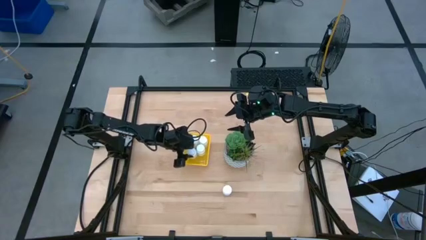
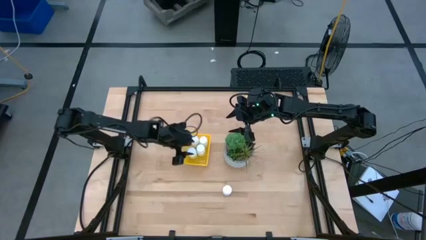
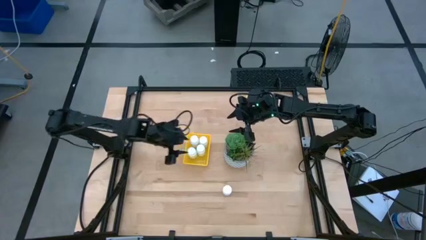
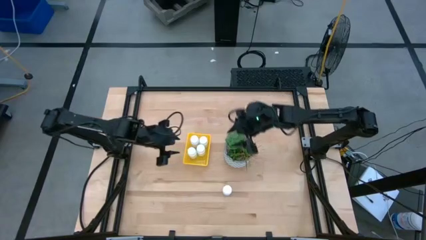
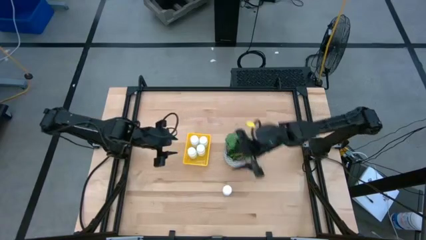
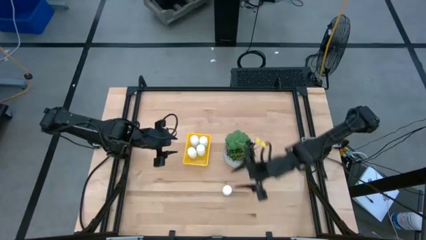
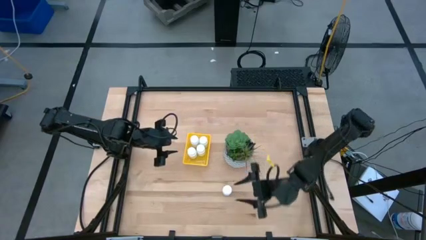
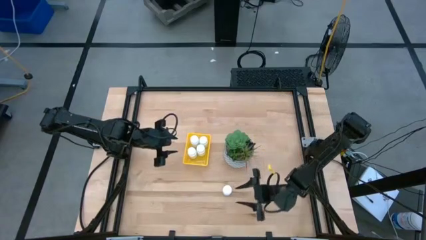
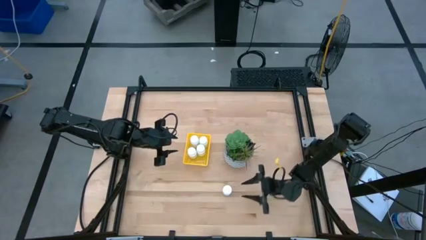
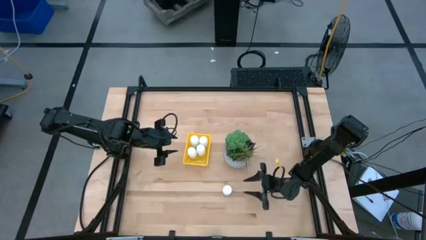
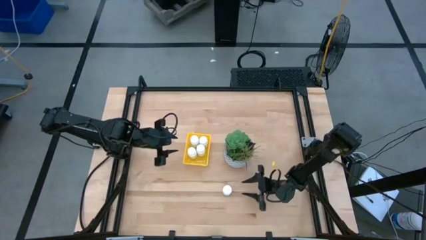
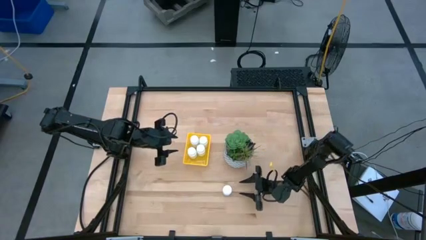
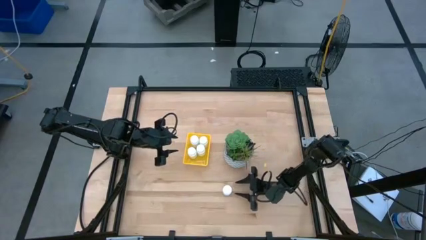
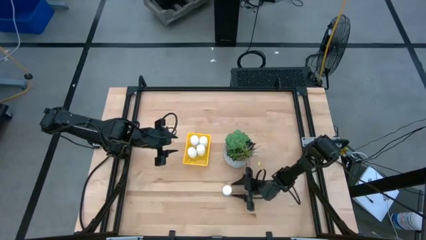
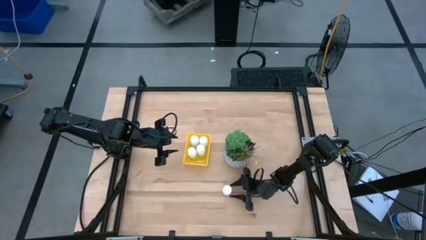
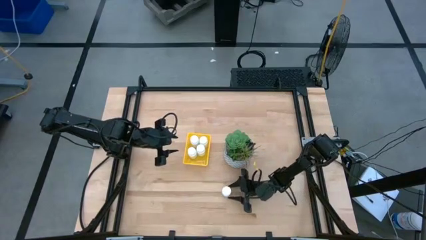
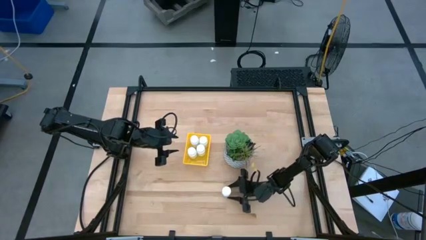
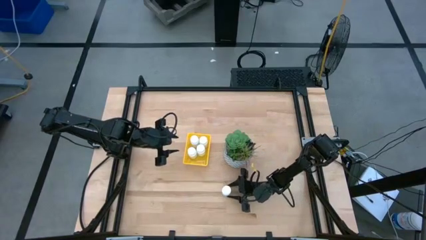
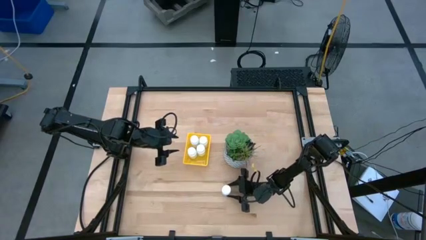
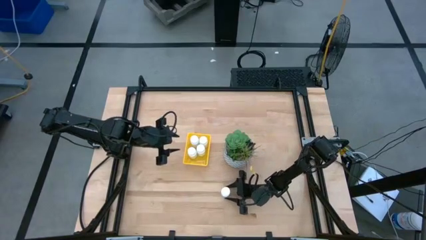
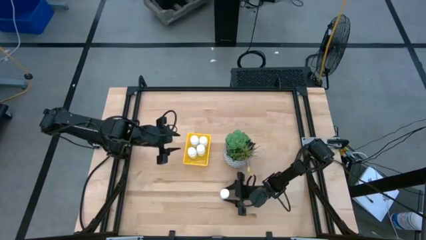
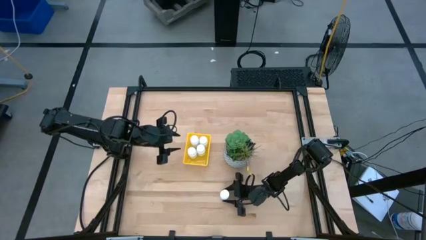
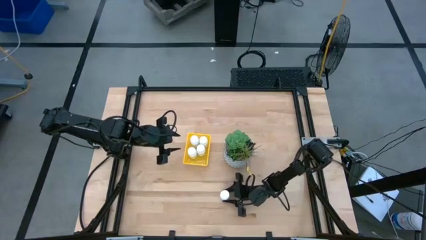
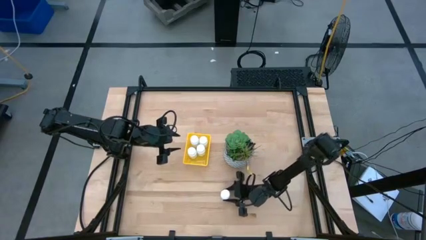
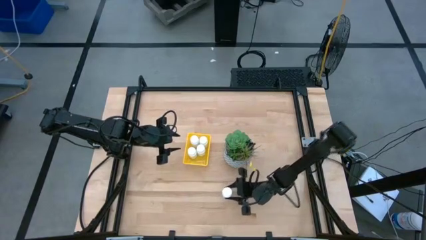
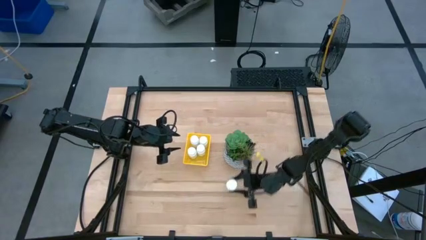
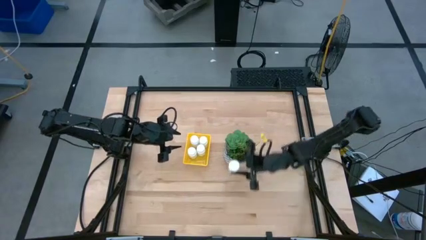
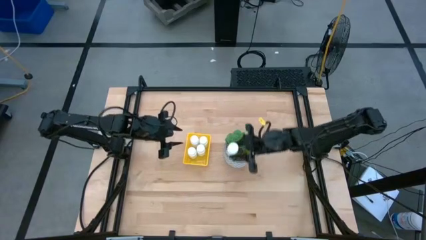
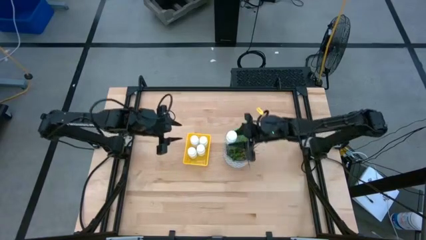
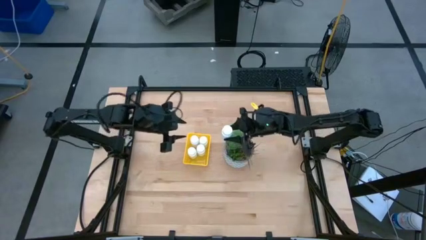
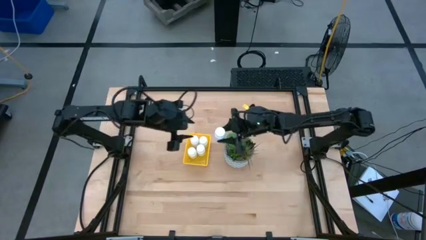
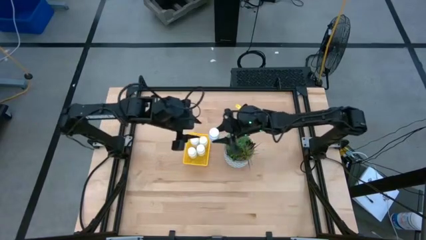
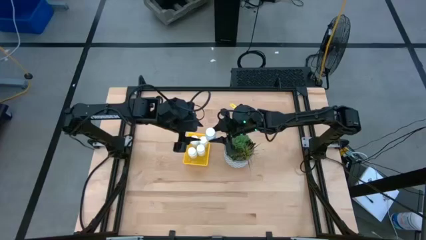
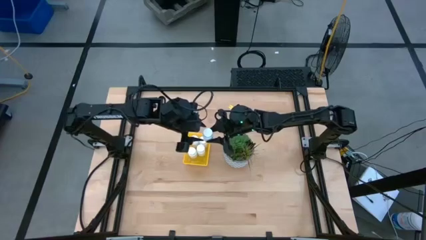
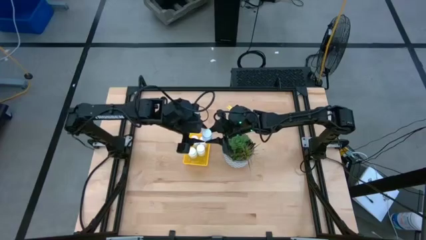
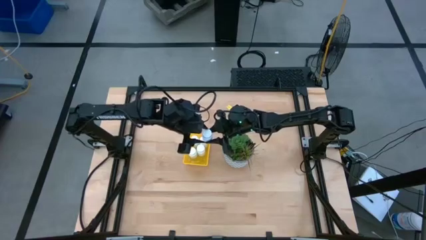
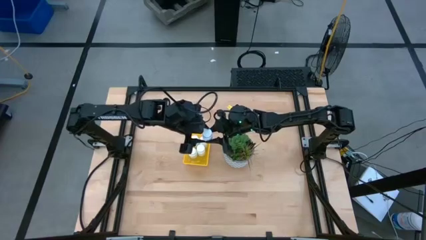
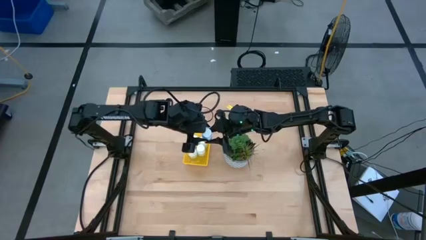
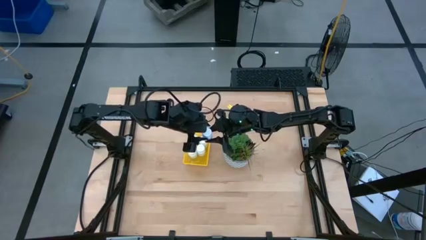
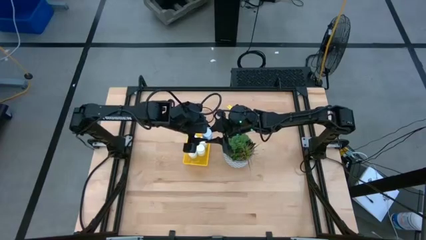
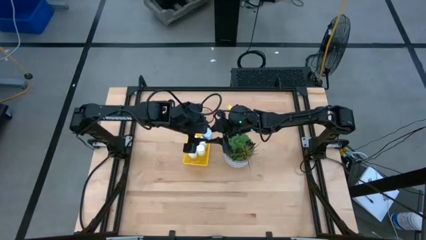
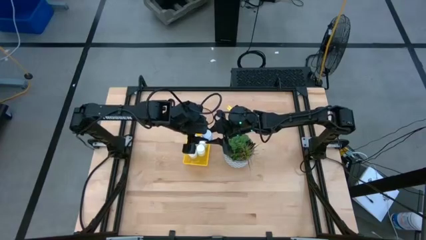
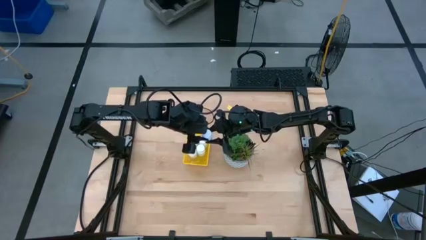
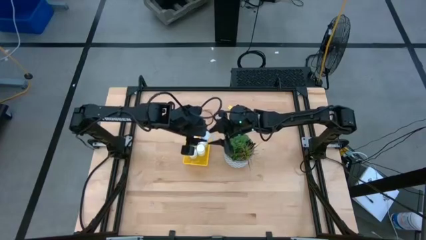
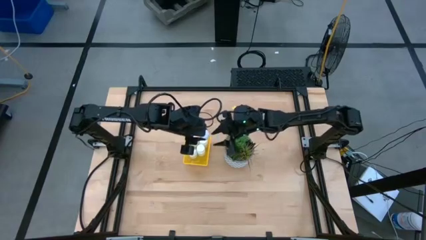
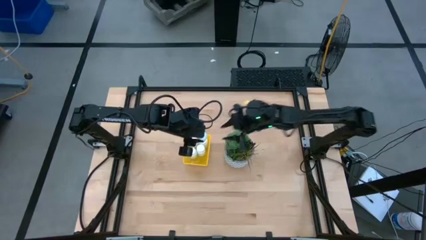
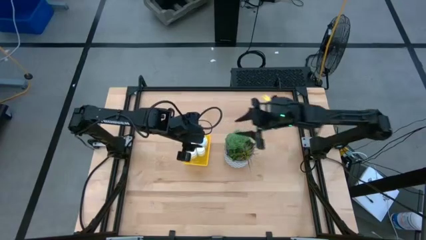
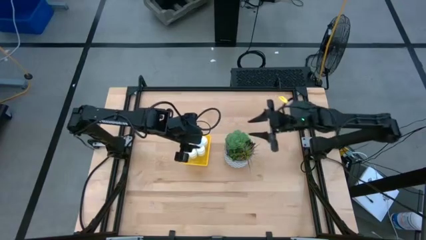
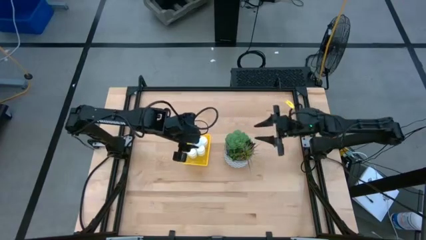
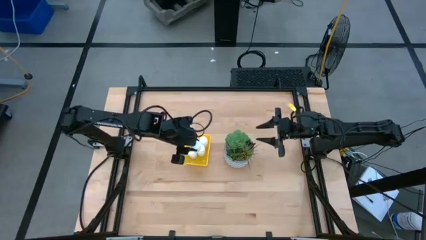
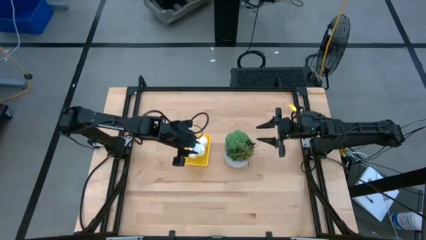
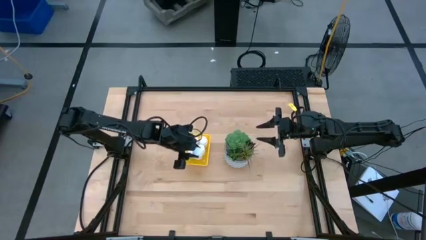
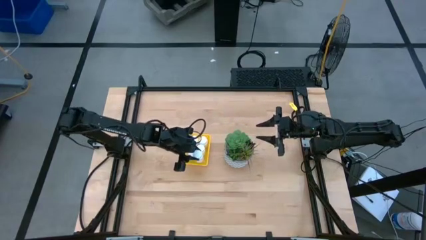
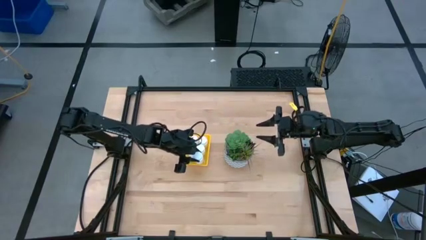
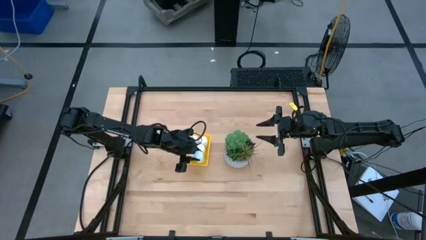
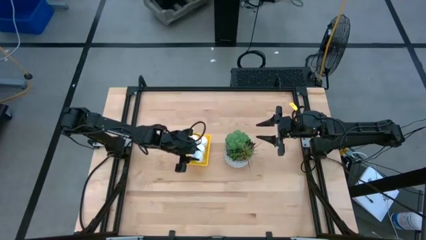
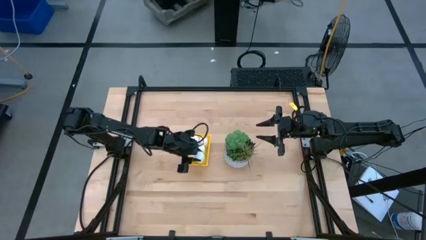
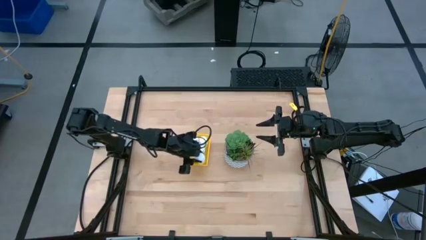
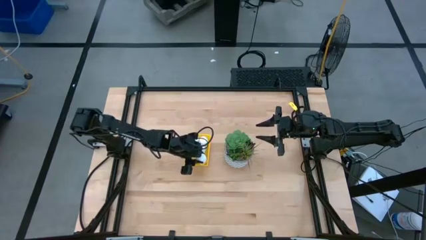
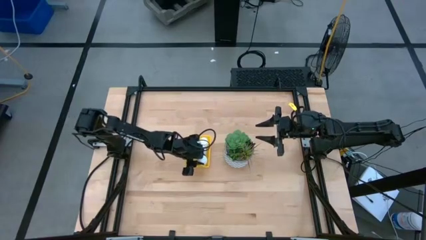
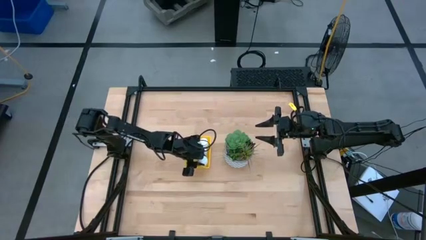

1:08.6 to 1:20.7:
Task: Pick and place pill bottles into a basket
Put the white medicine bottle into the yellow basket

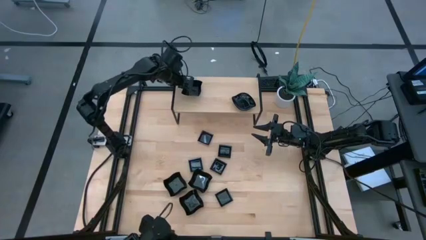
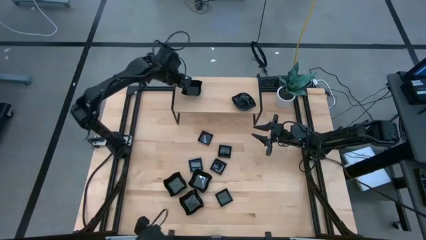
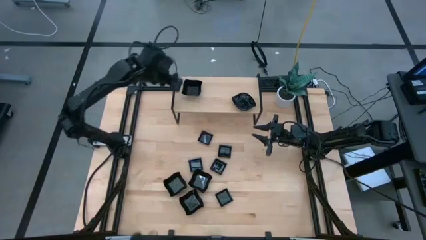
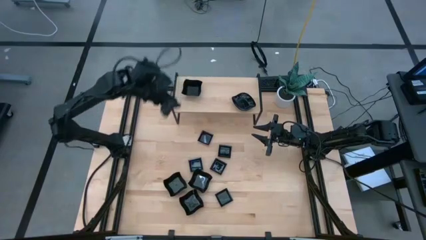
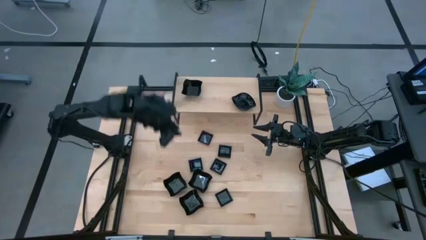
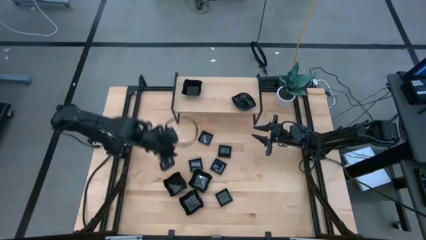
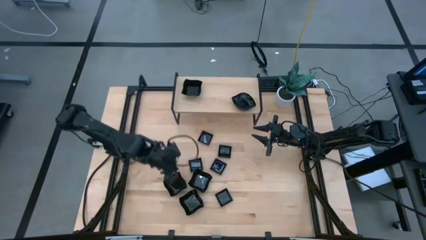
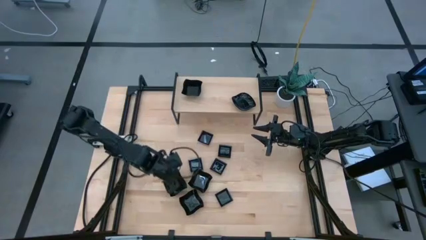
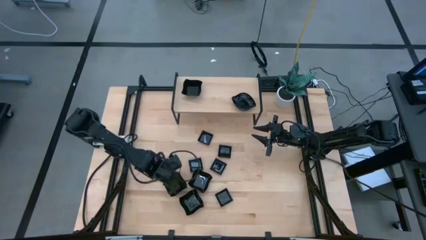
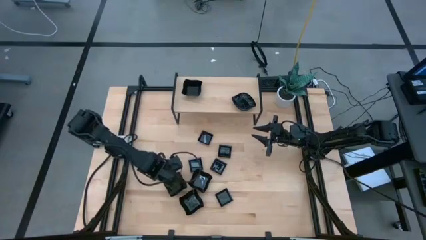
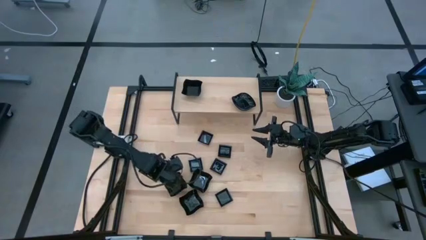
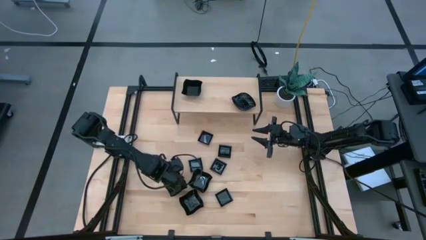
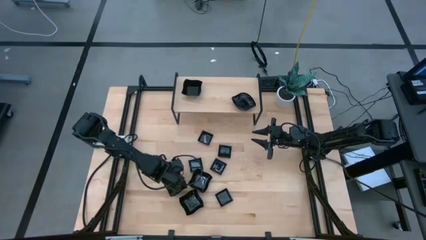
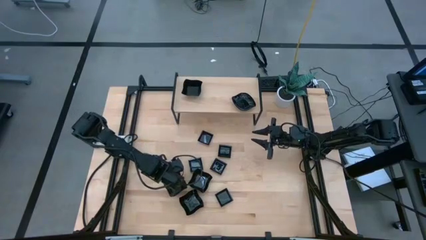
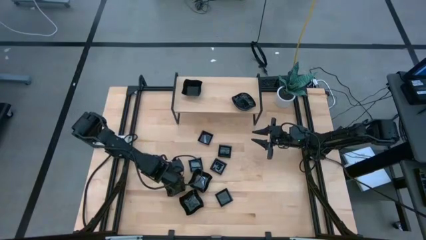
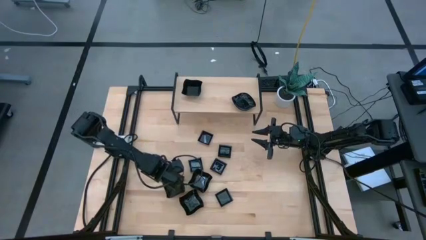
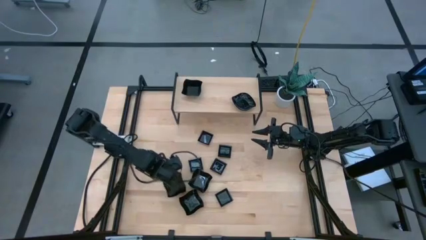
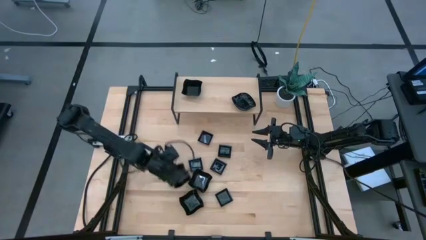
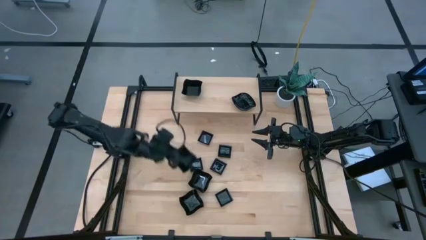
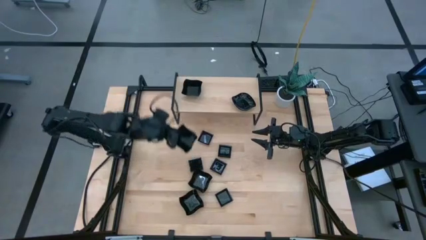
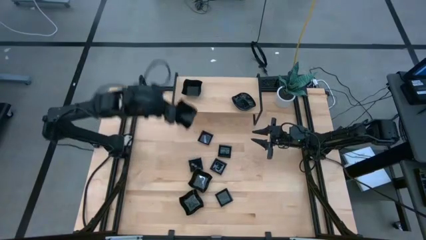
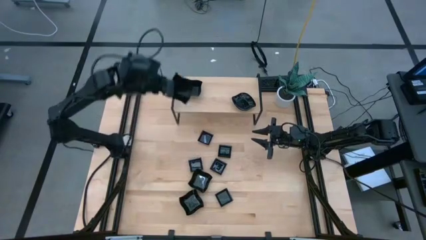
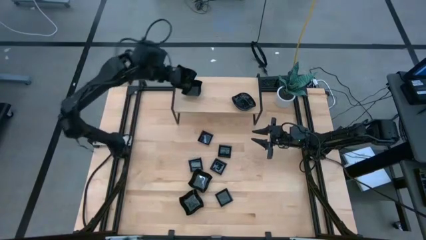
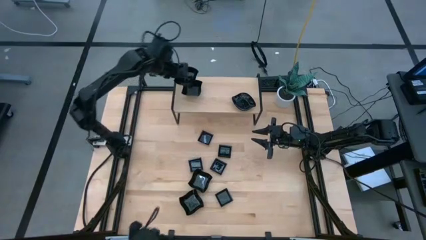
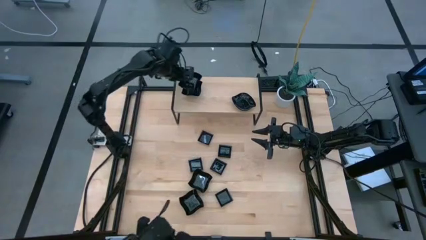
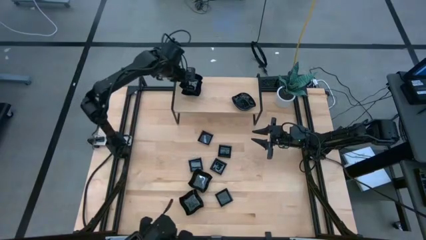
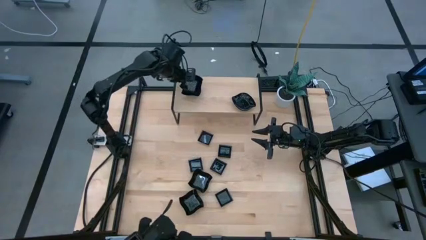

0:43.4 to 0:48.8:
Task: Pick & Place Mini shaped plates
Stack the top left distorted square plate on top of the other distorted square plate on the shelf
